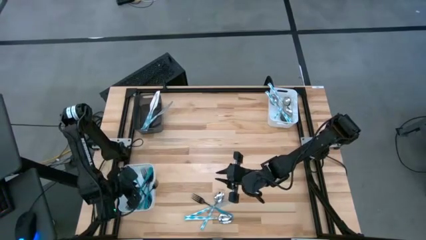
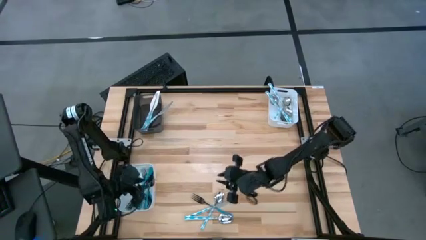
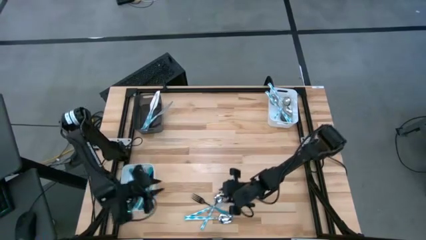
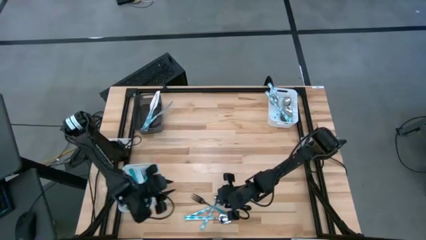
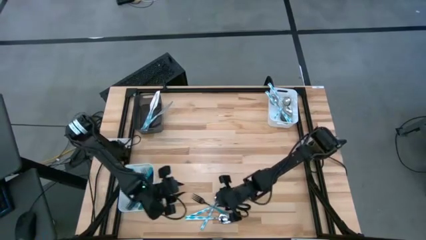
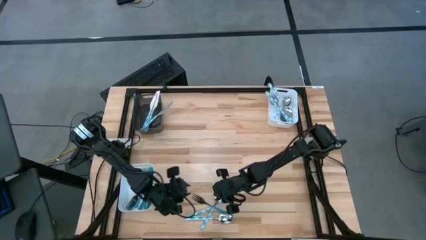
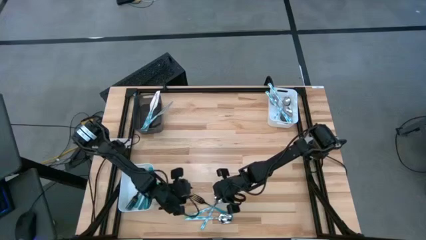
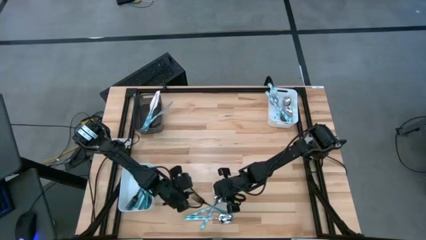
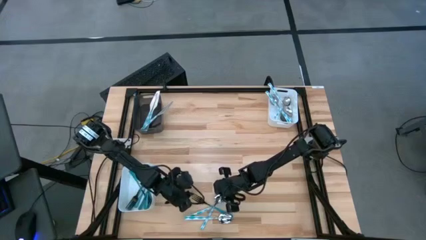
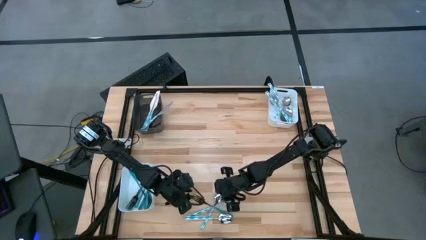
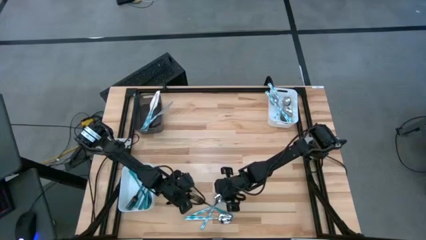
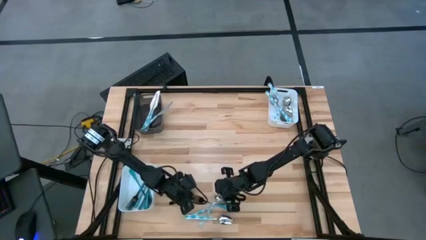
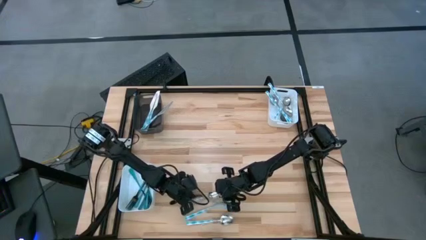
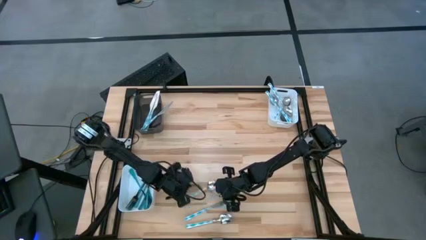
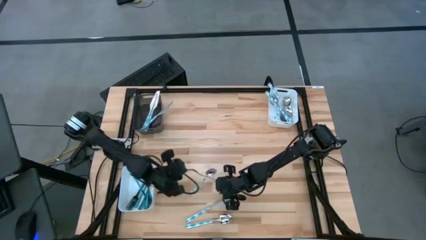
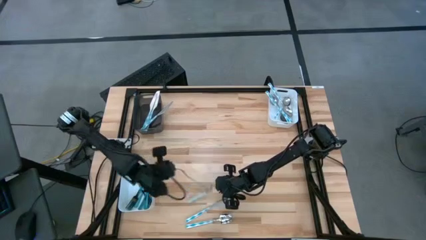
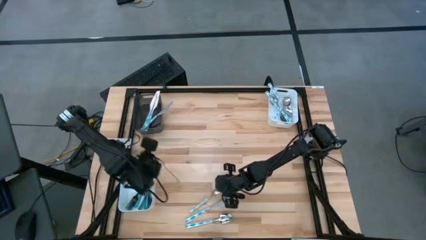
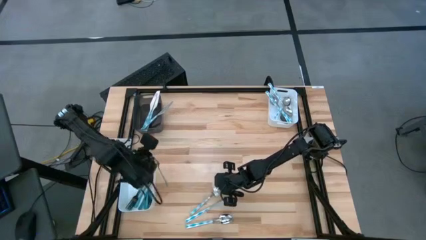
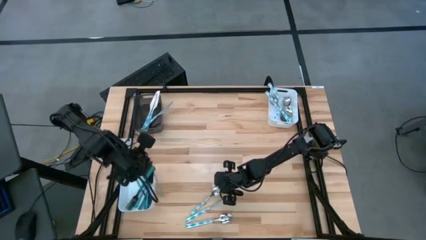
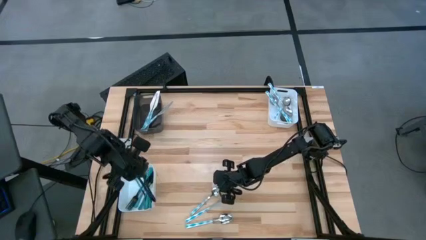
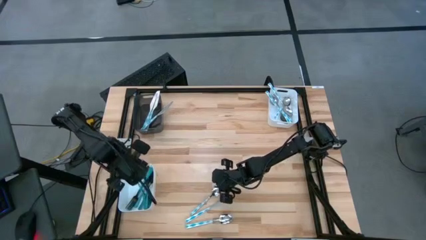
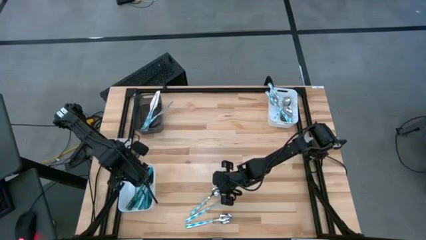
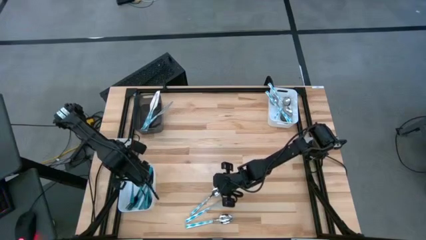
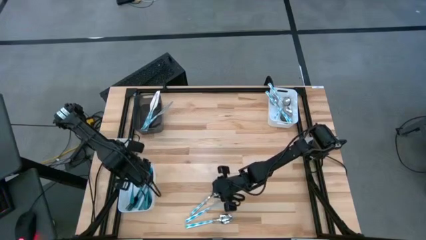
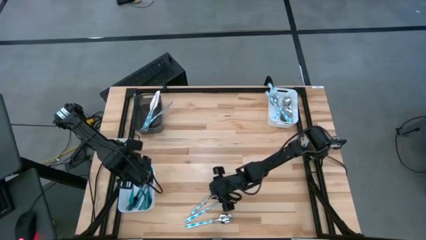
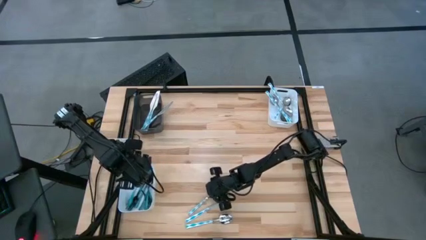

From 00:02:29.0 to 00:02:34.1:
Task: Sort silverware by color (type)
Put the blue fork into the left white bin

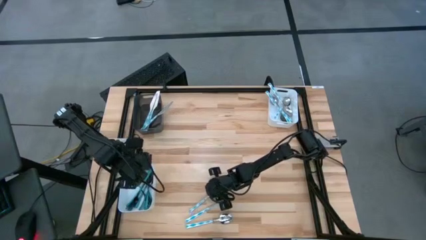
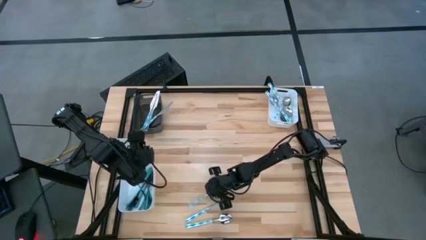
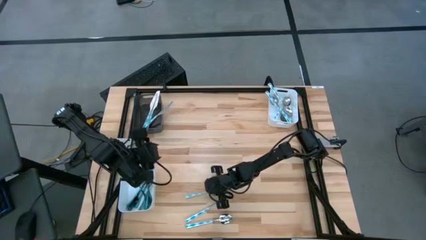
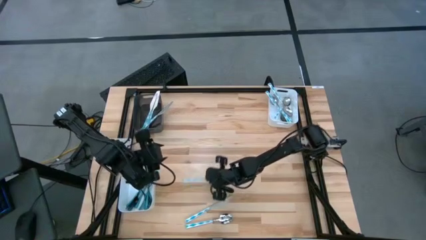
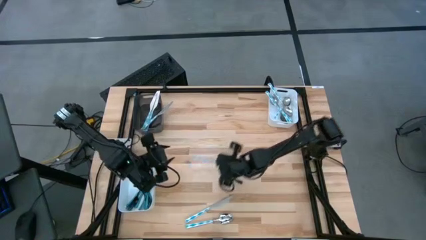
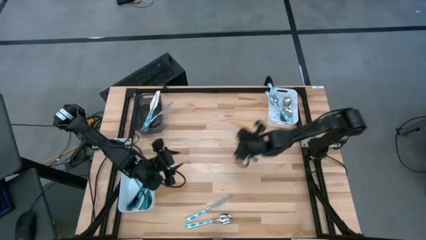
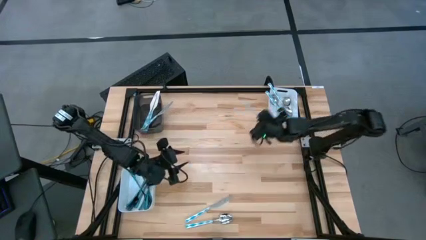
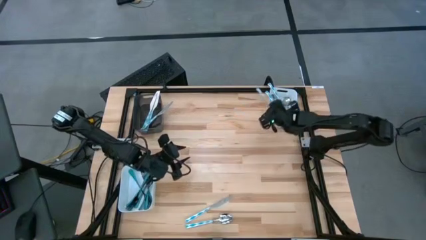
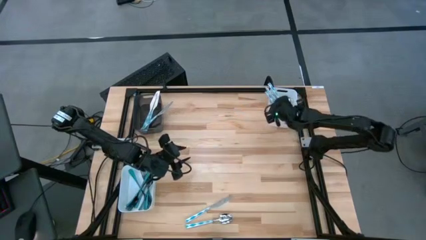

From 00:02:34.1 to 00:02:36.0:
Put the blue white spoon into the right white bin

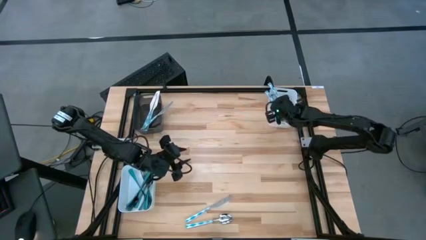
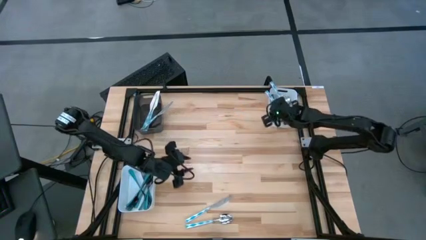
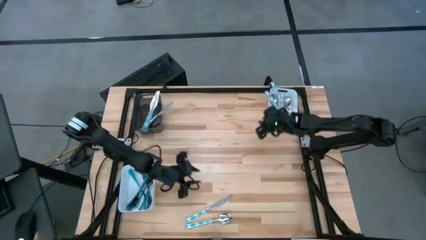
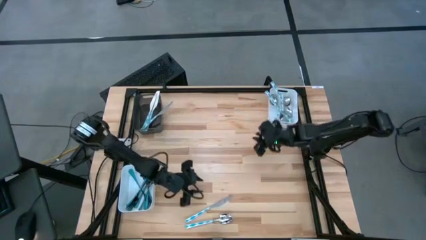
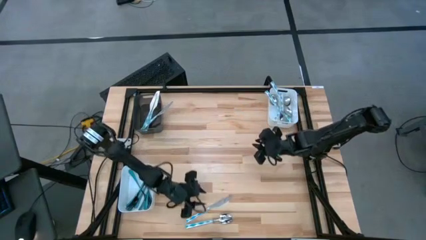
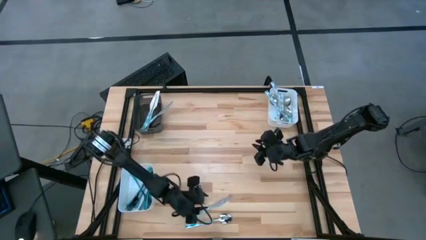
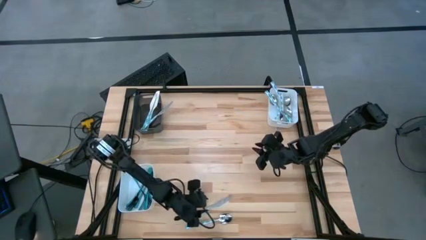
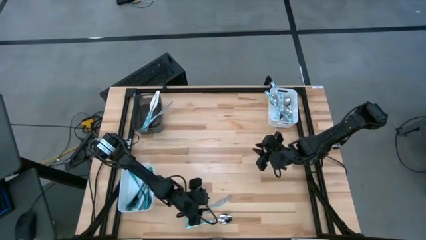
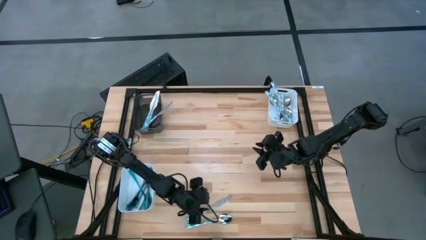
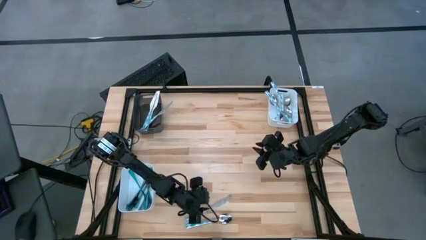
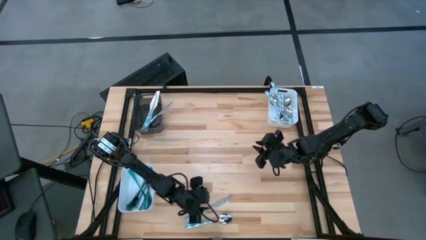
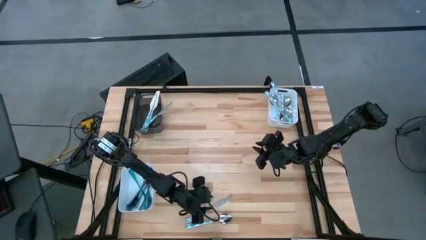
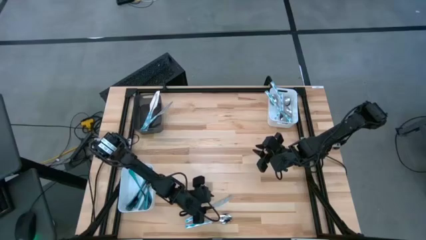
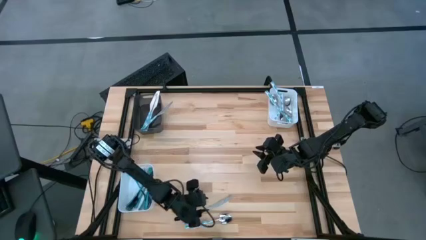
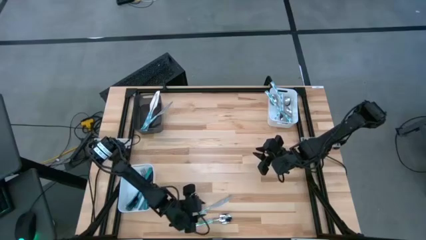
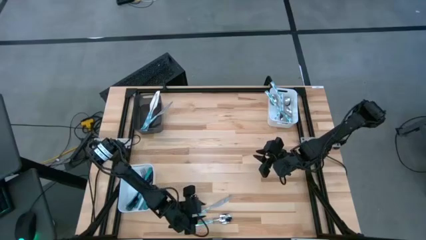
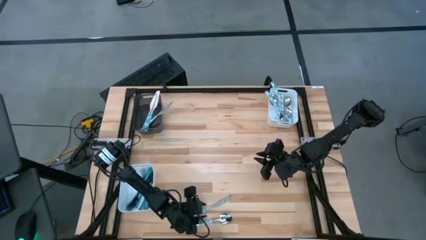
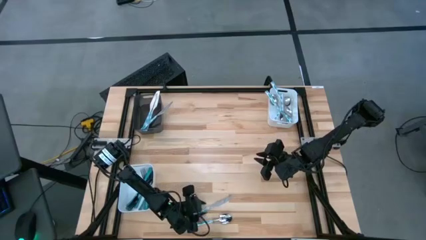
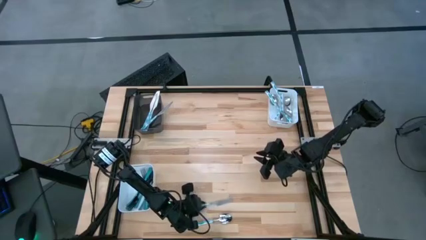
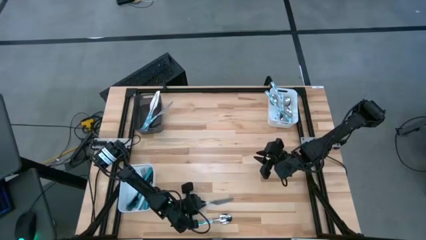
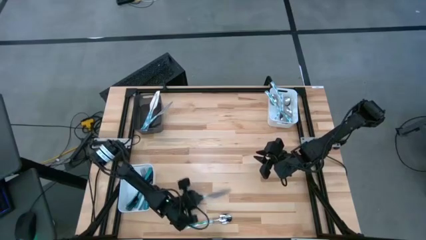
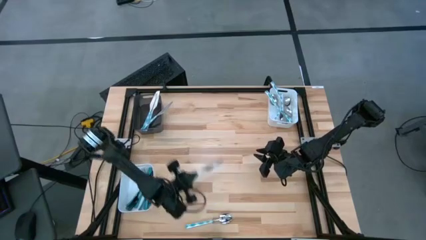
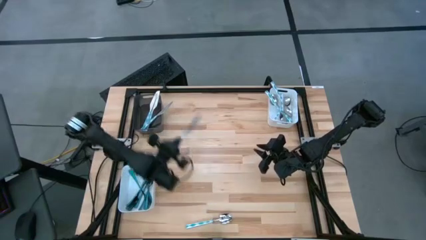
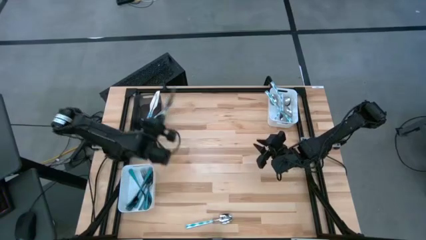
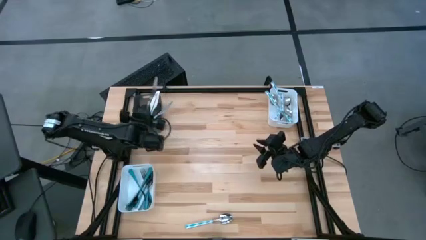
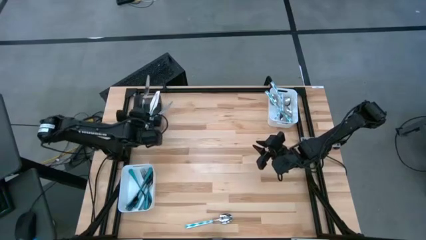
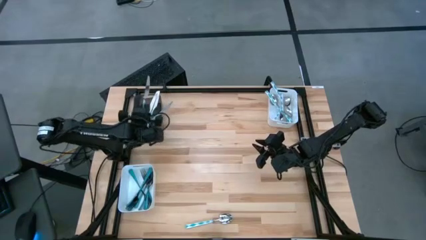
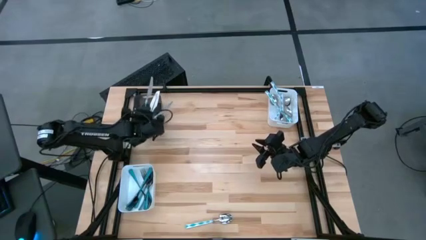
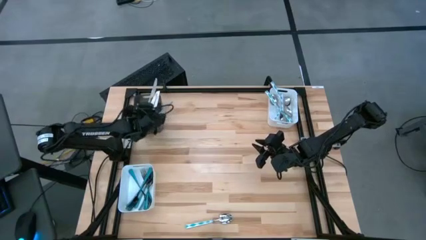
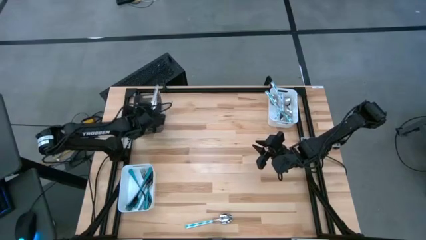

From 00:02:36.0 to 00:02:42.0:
Put the blue white knife into the black bin

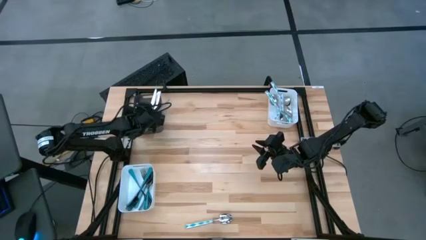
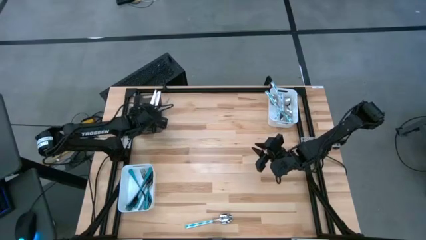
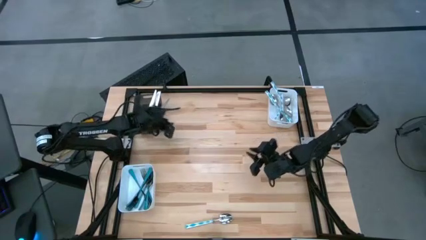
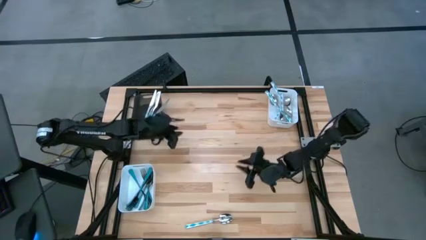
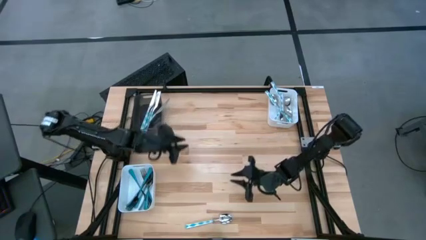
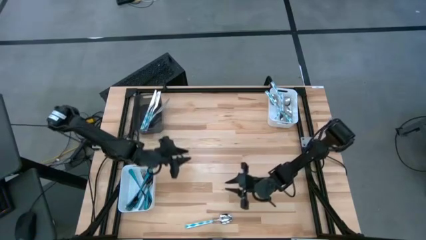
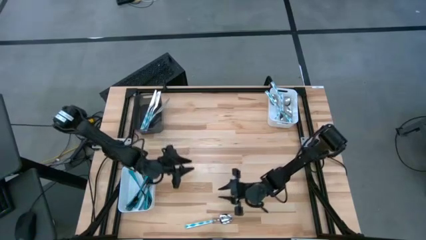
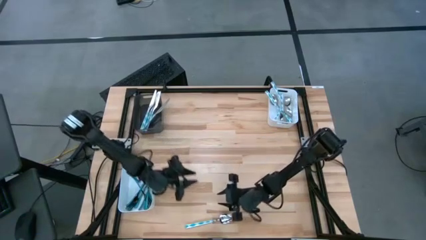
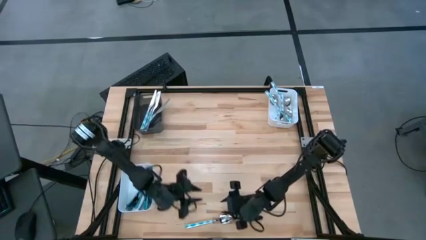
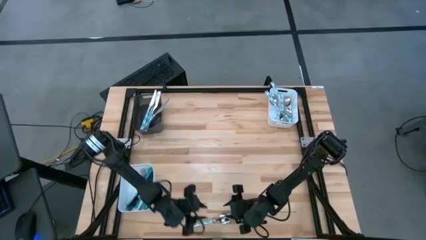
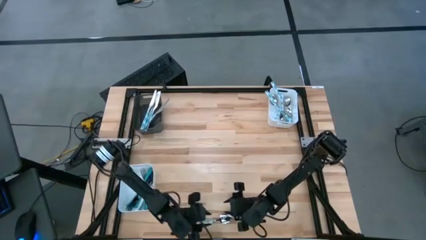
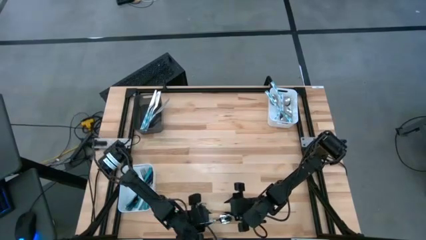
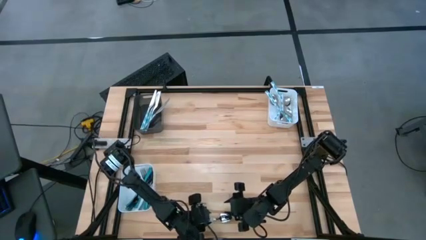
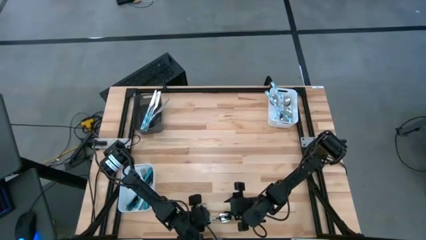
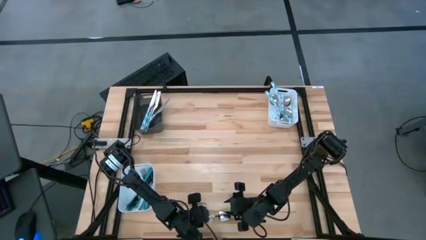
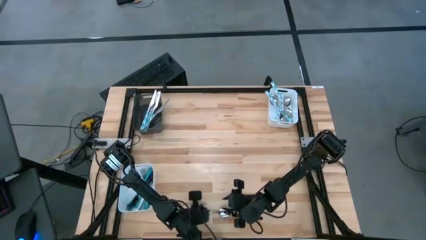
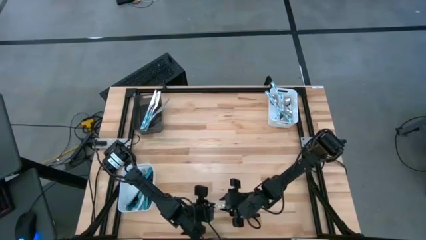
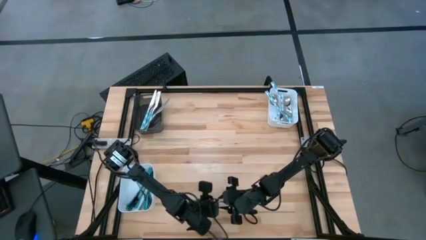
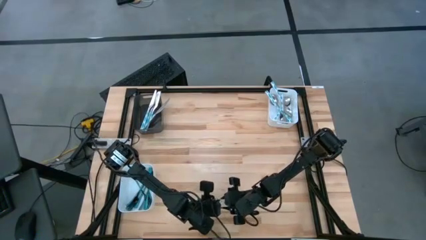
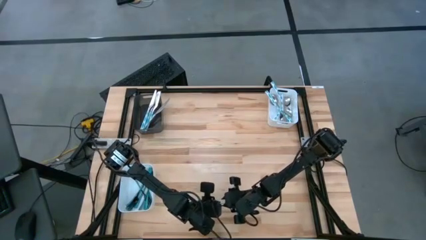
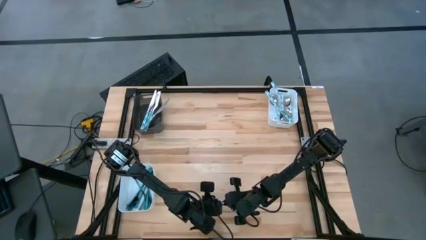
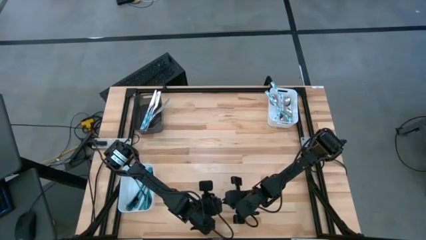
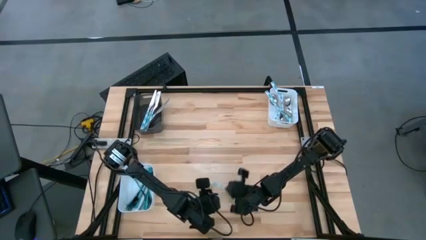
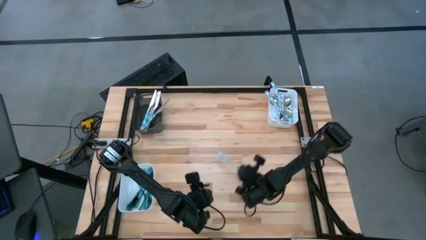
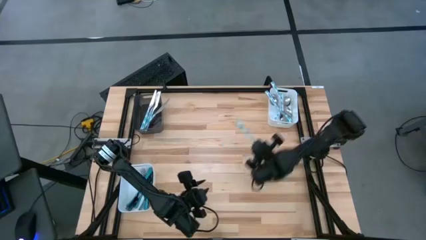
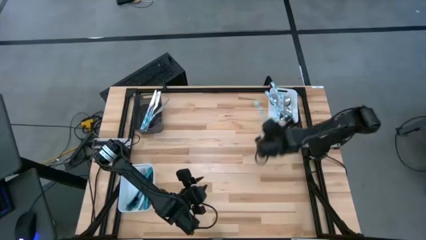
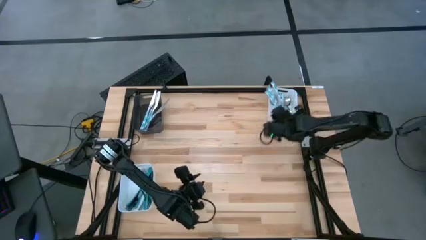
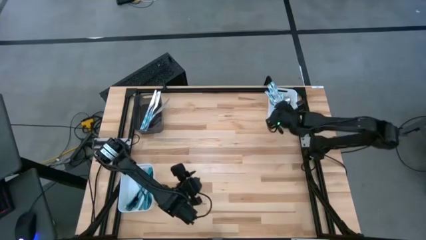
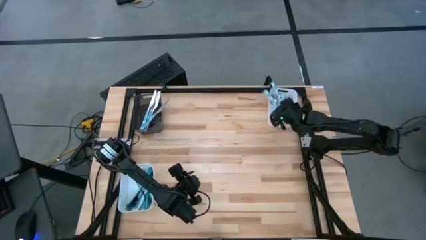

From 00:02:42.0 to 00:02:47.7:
Put the blue white spoon into the right white bin
